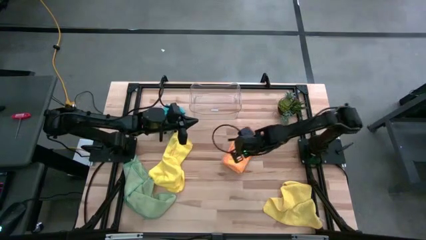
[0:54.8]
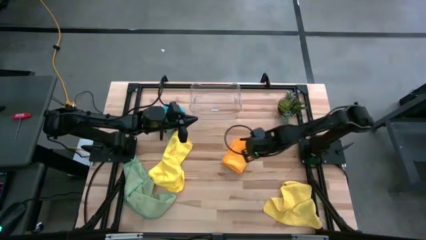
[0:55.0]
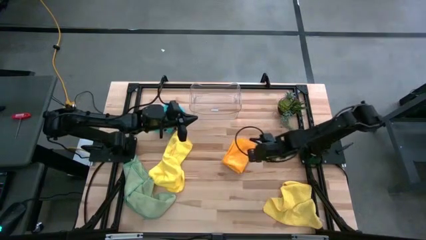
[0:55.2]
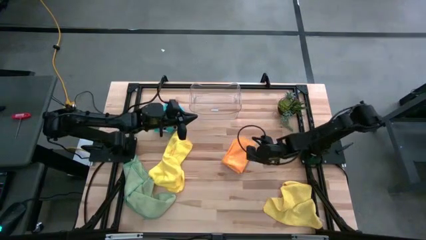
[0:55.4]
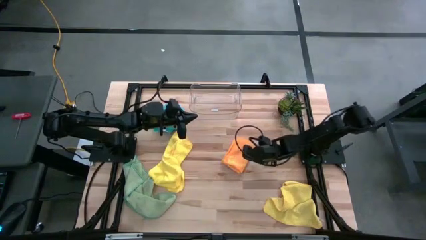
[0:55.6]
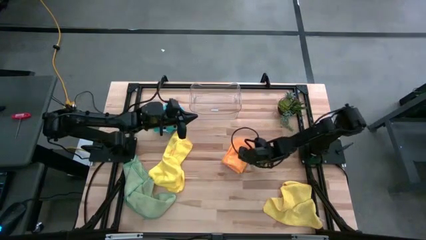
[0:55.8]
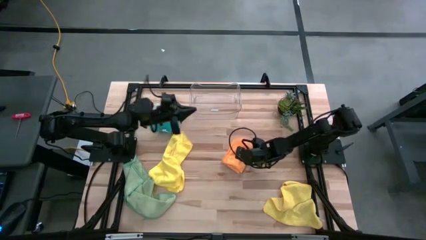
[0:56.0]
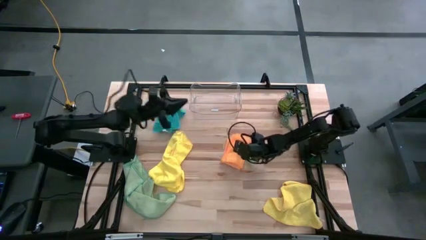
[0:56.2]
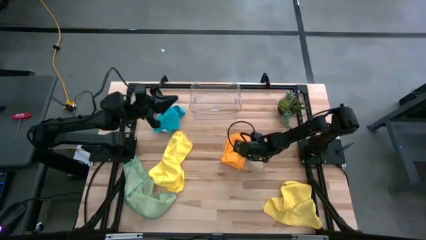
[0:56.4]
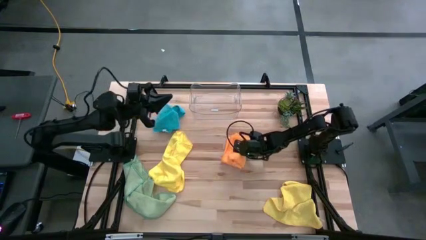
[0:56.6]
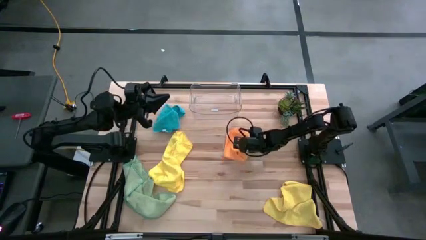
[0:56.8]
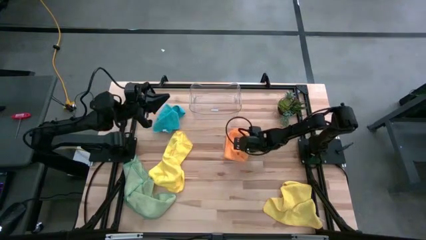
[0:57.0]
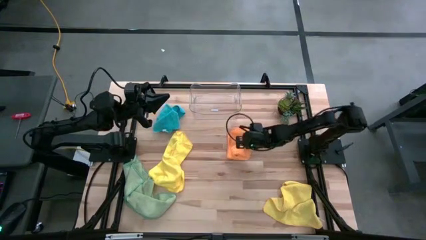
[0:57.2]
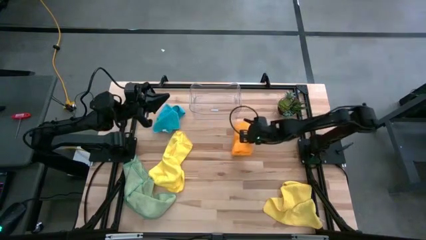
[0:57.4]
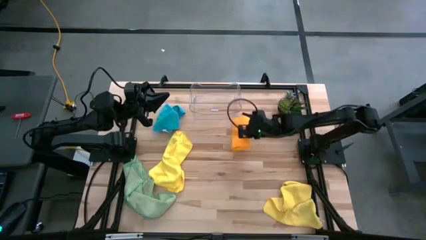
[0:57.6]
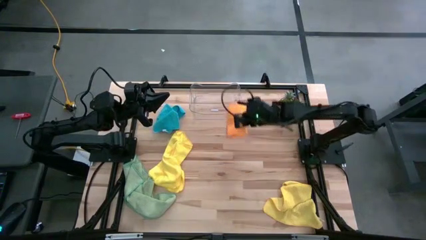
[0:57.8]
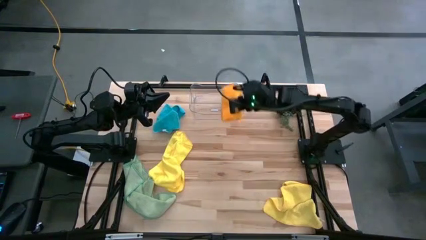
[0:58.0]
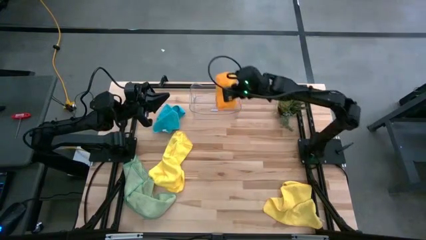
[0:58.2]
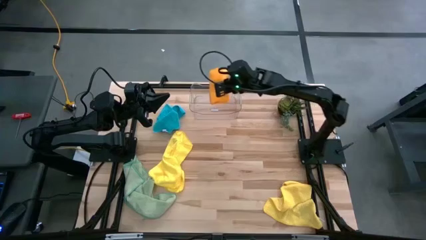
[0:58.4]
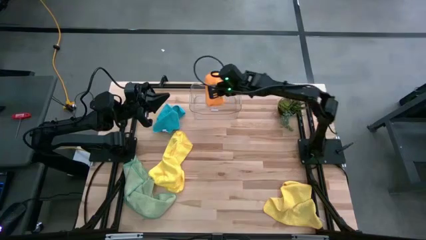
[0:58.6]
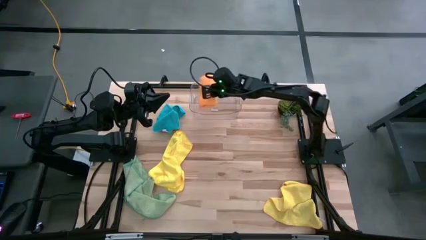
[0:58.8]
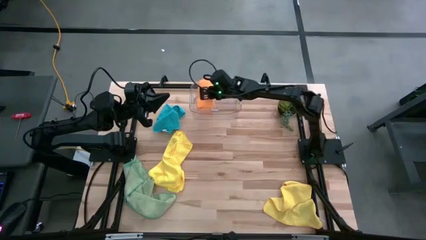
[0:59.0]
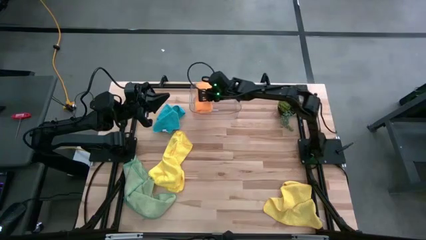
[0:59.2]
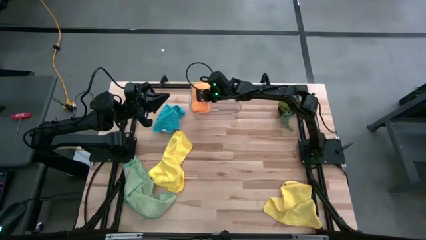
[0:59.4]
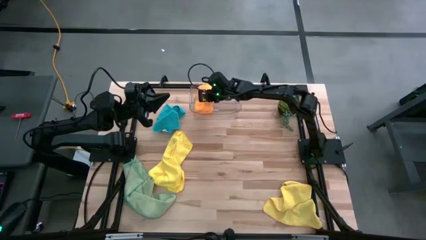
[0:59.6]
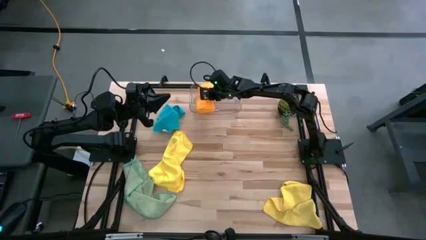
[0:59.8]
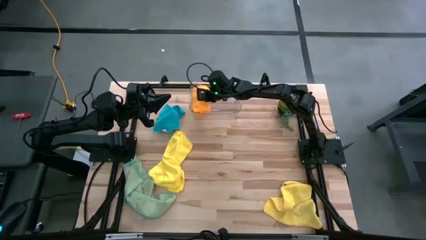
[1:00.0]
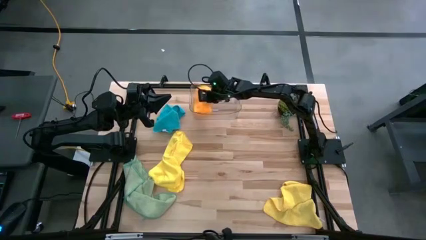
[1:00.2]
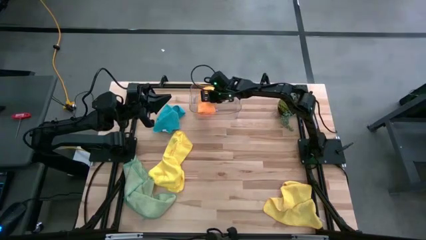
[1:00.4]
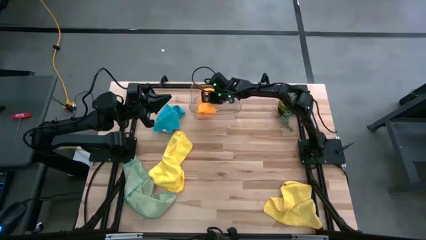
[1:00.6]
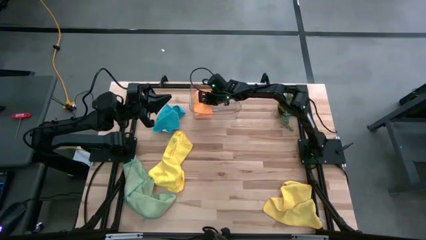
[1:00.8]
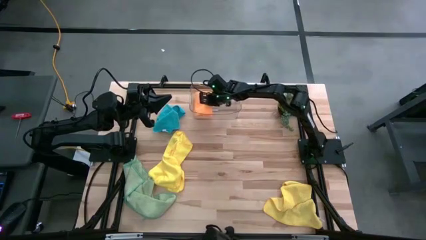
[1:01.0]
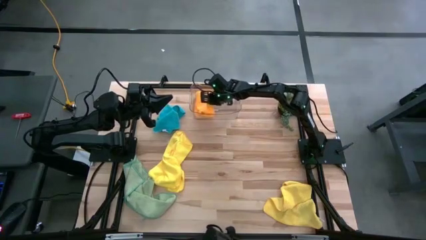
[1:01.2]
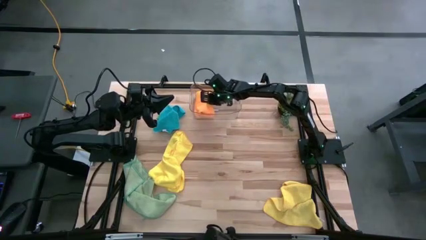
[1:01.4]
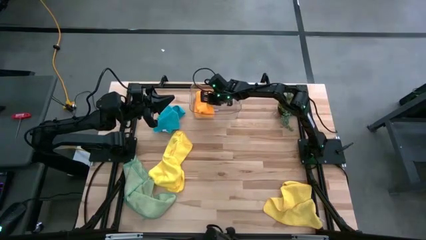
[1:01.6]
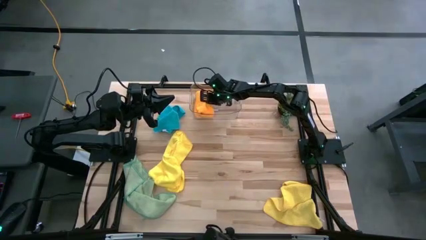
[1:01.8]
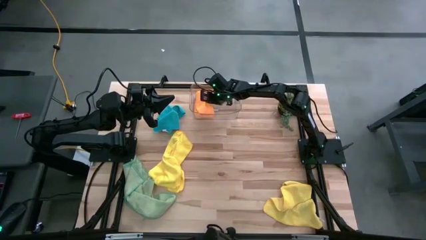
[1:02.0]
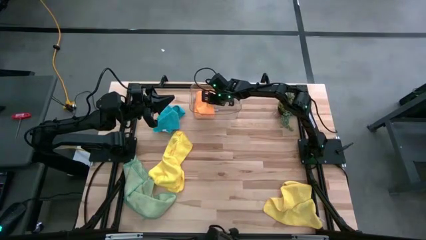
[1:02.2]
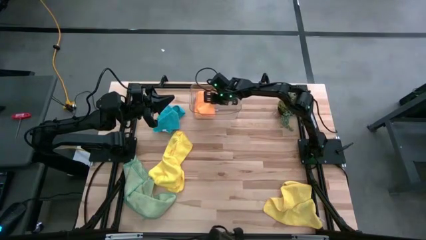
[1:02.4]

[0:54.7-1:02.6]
Task: Fold microfiber towels
Put the orange microfiber towel into the transparent bin

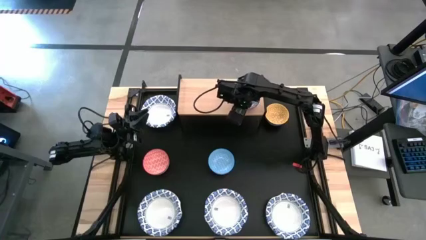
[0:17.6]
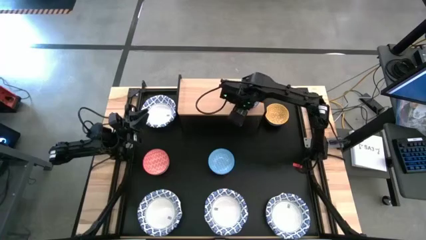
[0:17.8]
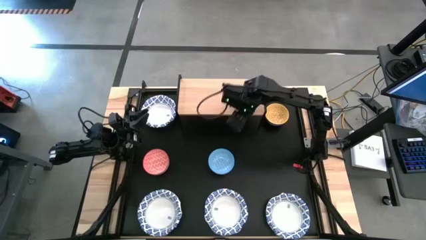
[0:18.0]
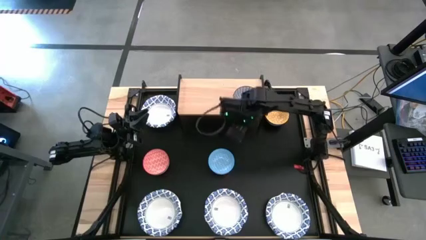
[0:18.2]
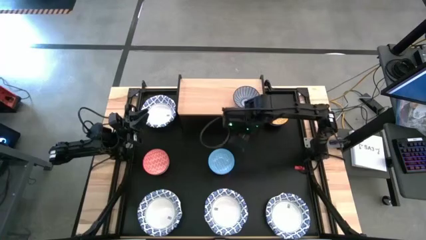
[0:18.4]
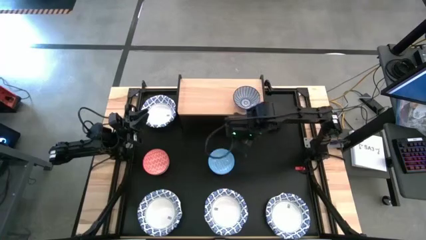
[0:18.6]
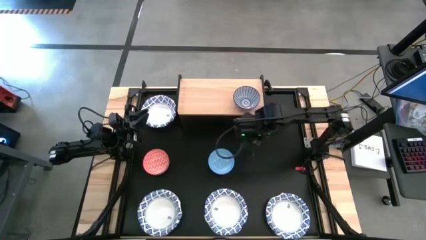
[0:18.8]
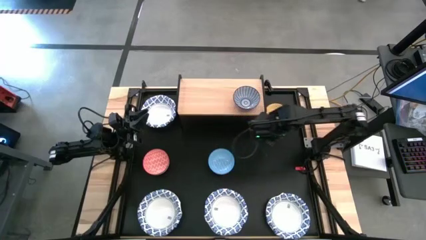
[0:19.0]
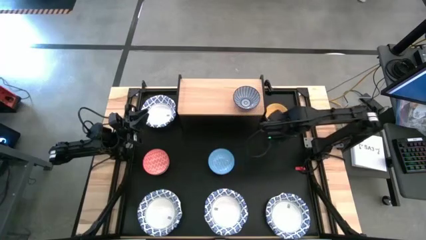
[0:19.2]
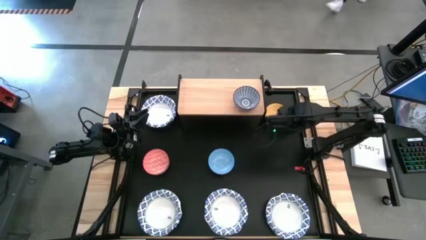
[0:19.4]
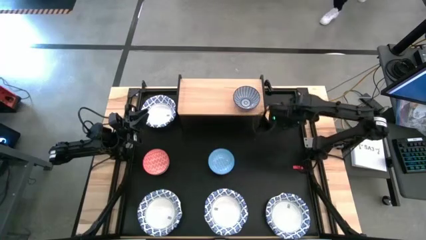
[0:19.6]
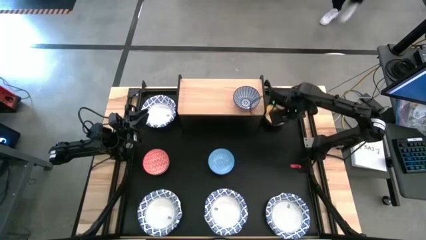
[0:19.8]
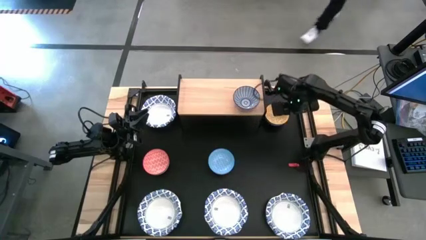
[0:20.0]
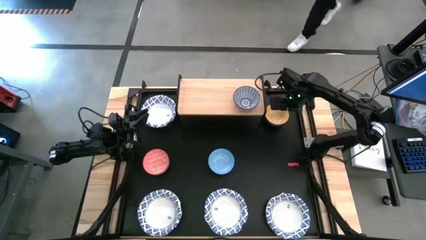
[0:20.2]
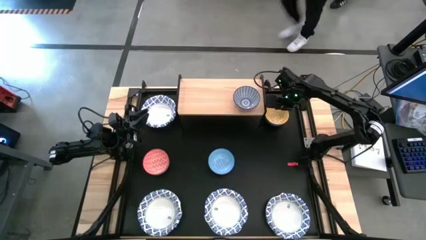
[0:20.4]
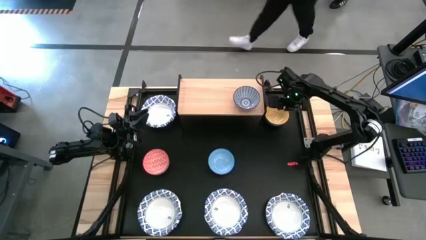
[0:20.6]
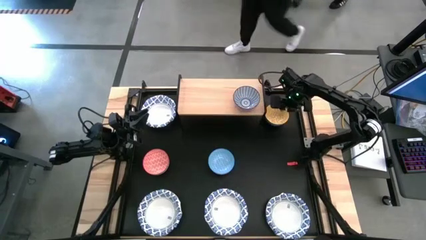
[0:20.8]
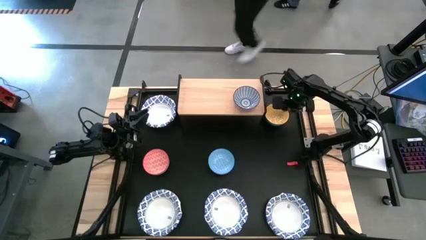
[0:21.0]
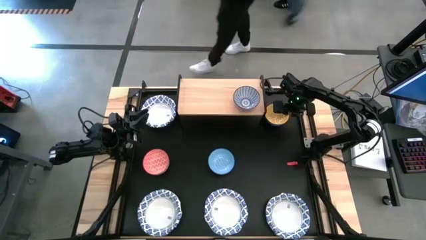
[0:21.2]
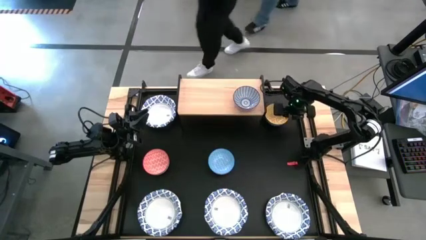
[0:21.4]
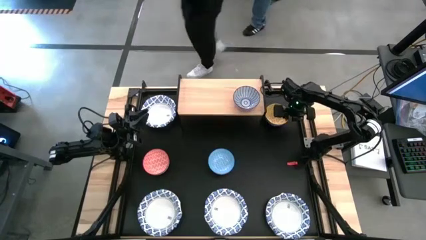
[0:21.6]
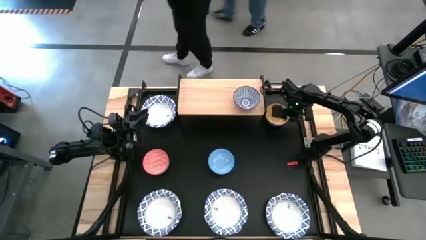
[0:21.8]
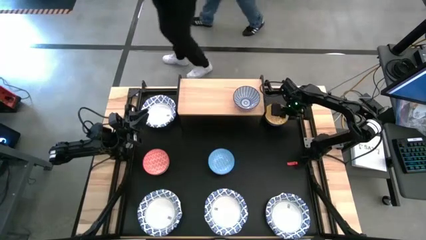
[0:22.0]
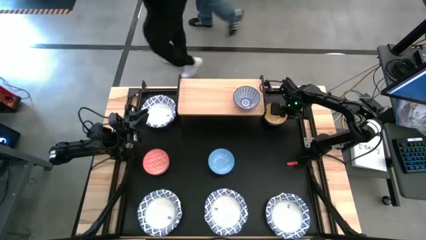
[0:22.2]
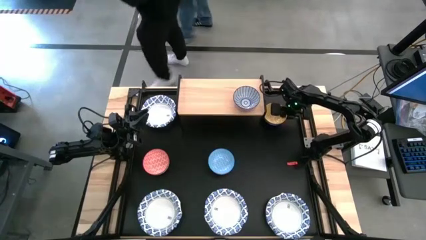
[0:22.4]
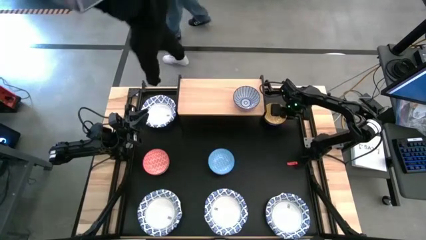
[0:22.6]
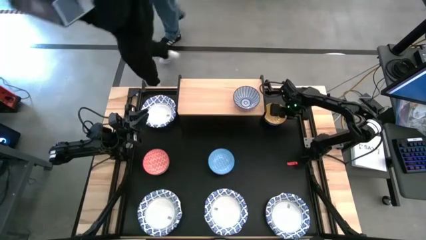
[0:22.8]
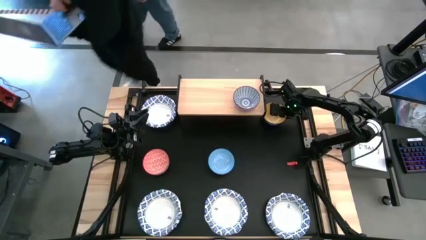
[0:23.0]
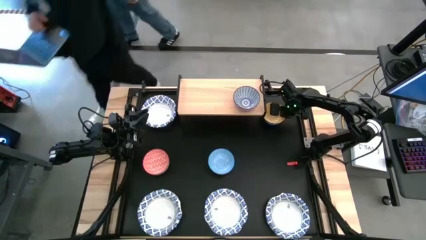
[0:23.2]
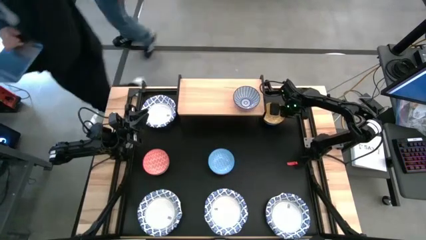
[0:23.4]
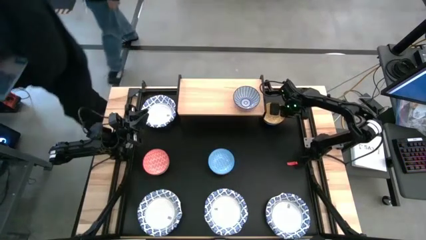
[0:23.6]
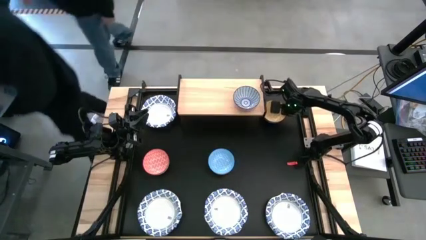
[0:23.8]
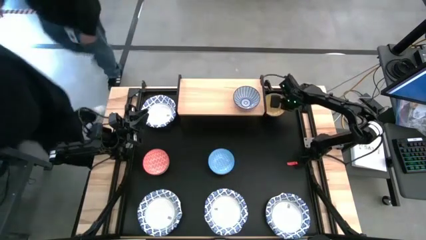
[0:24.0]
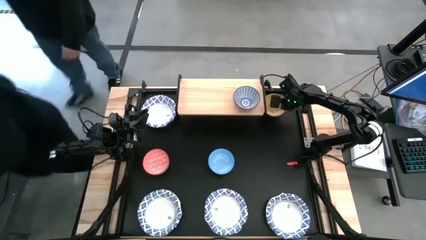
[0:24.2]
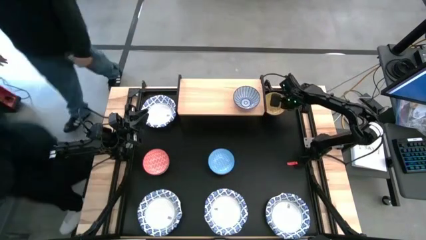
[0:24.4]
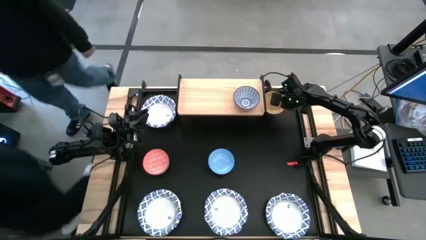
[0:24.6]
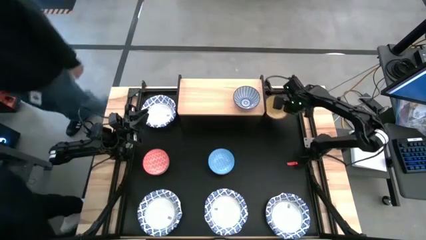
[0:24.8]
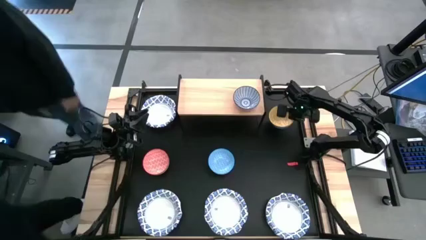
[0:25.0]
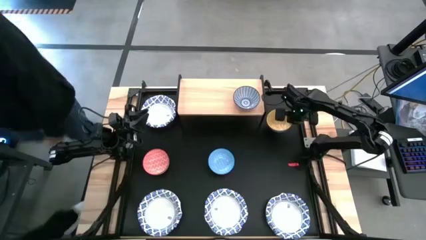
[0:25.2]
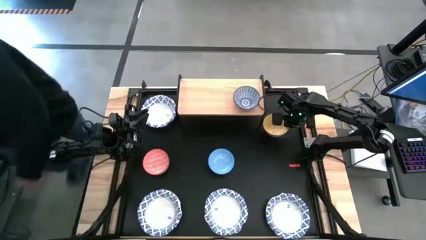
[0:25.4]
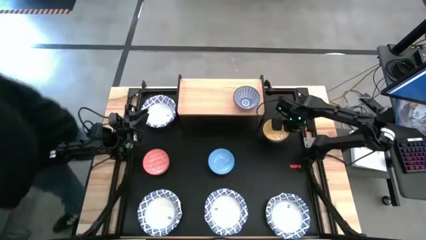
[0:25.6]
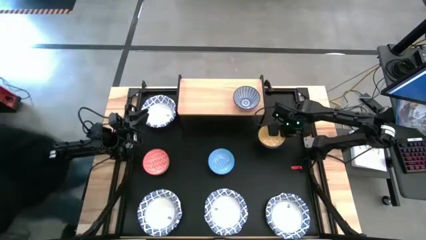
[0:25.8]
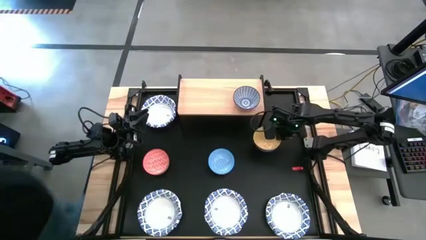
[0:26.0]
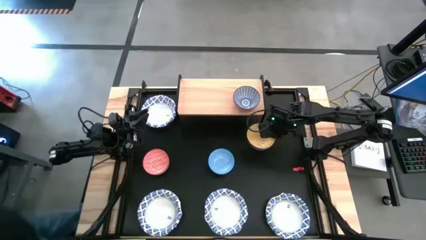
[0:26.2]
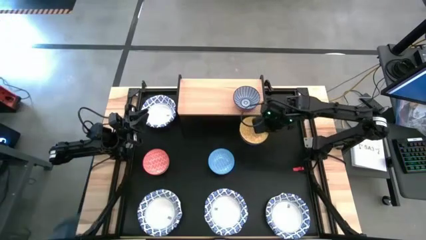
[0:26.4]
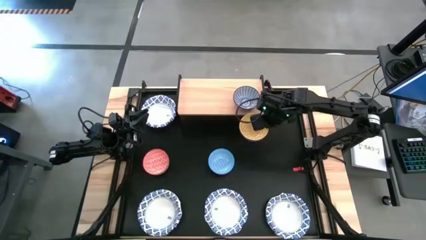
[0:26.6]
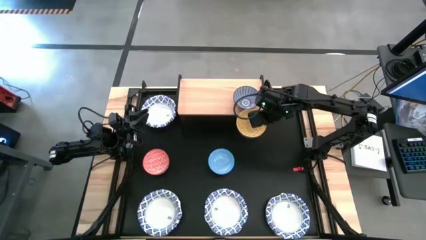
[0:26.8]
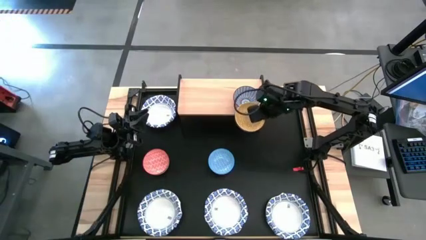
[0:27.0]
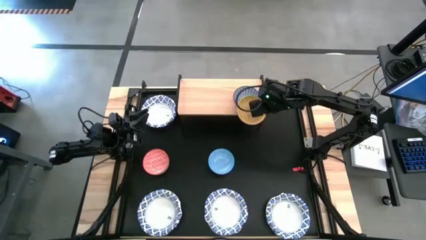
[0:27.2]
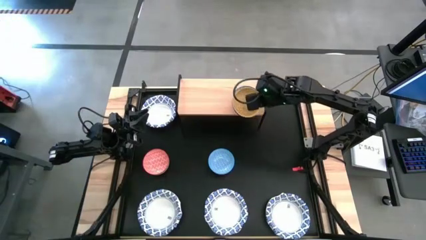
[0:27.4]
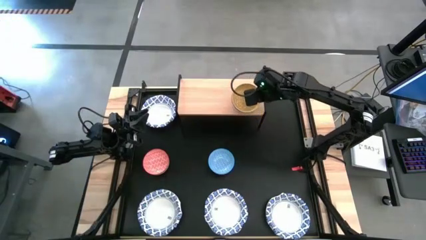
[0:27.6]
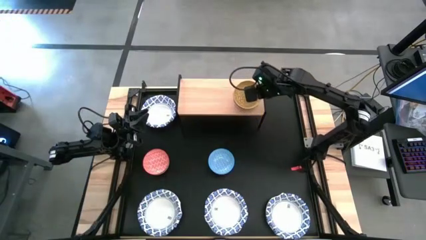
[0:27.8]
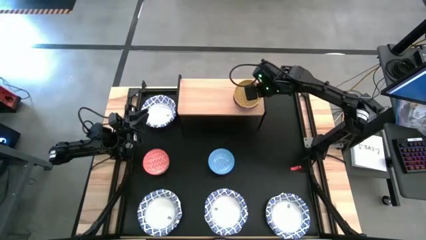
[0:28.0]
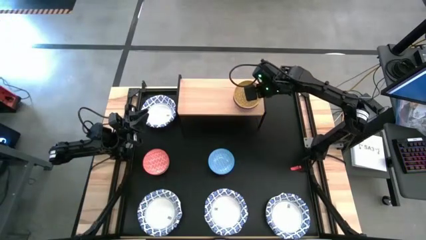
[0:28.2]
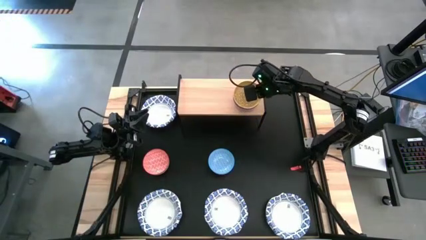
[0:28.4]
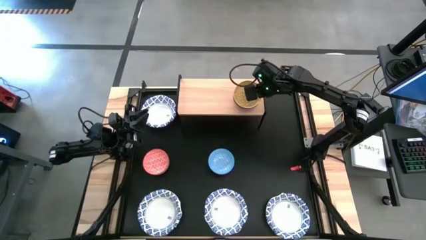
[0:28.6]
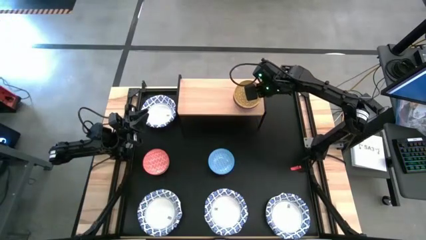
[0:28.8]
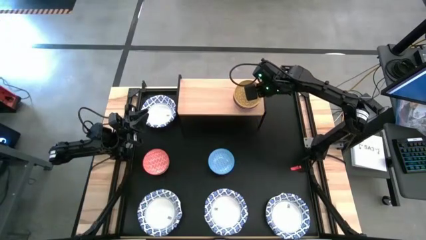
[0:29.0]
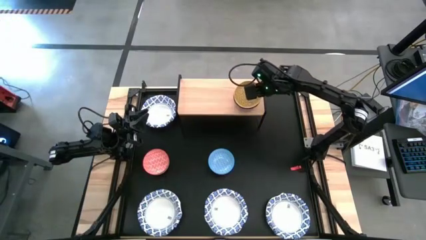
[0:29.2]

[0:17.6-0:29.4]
Task: Place and stack bowls onto a shelf
Stack the yellow bowl on the blue bowl on the shelf
